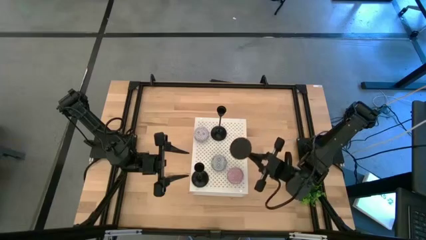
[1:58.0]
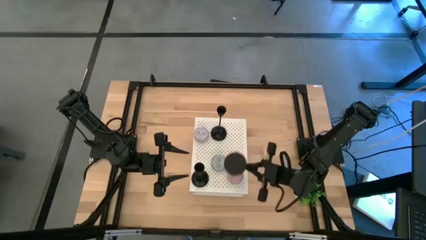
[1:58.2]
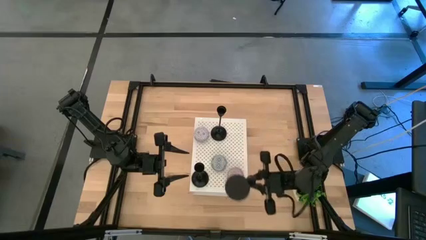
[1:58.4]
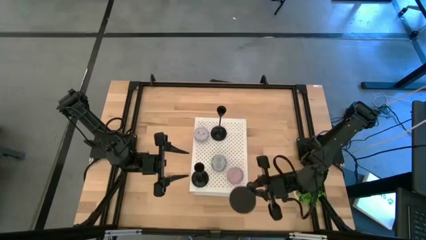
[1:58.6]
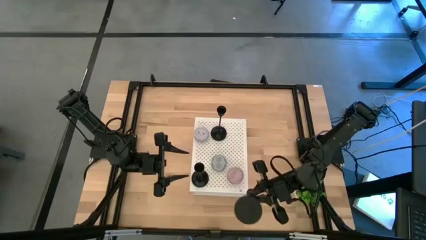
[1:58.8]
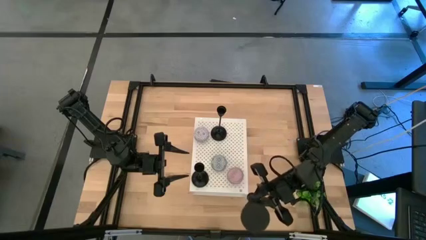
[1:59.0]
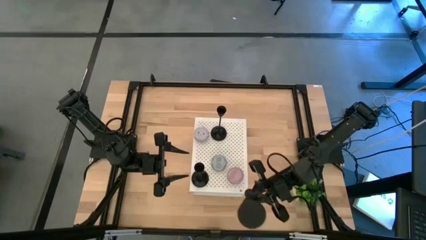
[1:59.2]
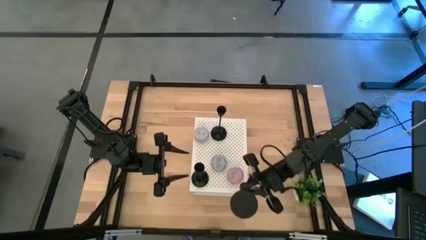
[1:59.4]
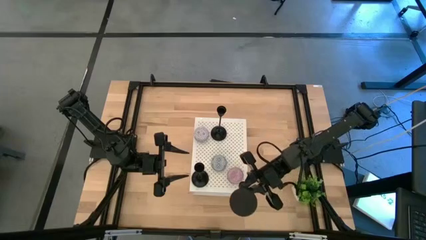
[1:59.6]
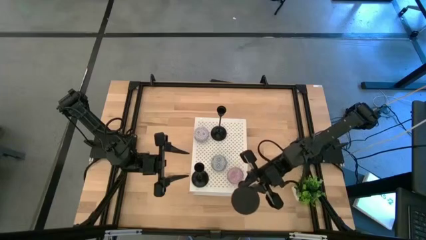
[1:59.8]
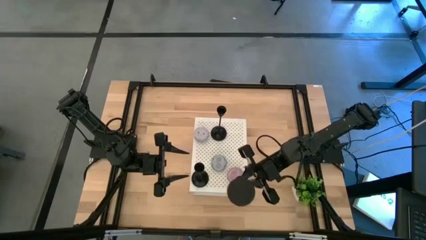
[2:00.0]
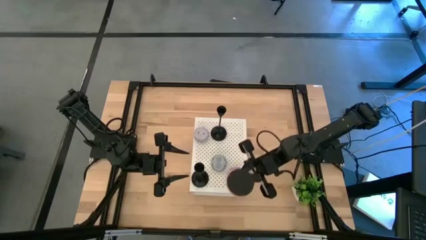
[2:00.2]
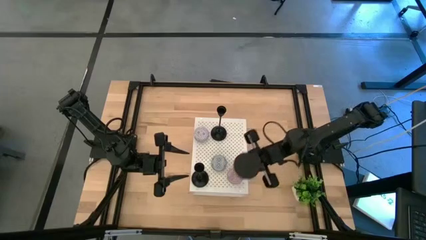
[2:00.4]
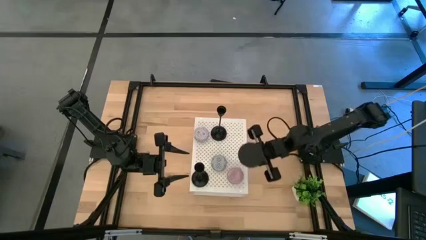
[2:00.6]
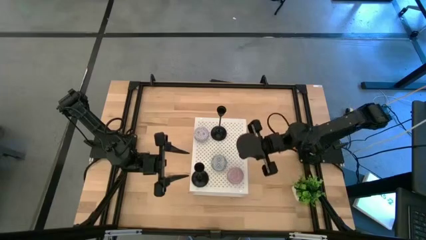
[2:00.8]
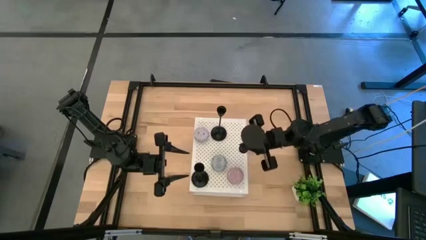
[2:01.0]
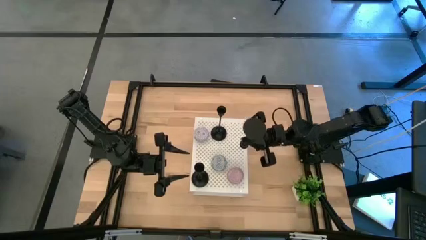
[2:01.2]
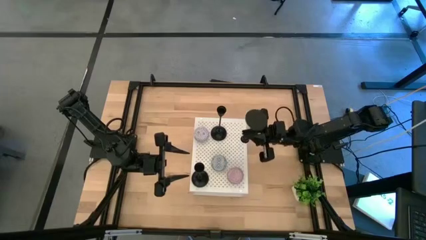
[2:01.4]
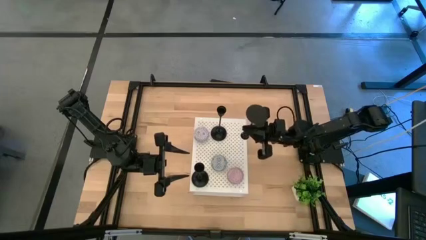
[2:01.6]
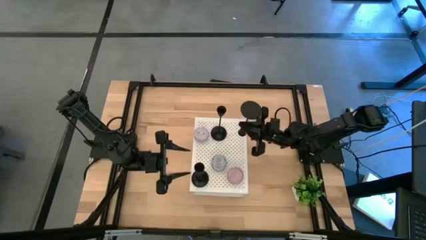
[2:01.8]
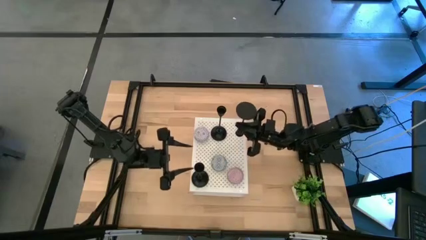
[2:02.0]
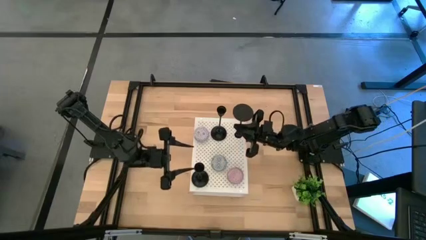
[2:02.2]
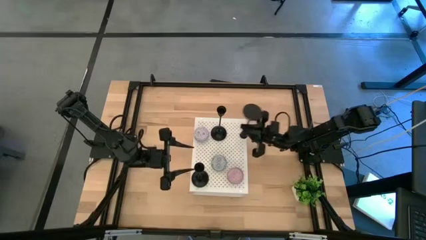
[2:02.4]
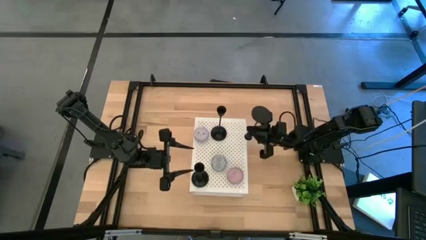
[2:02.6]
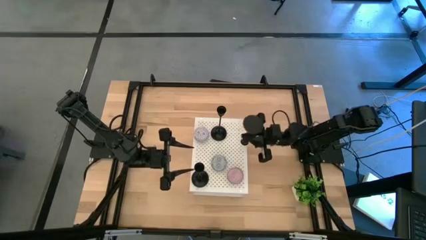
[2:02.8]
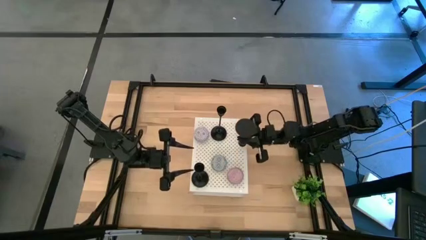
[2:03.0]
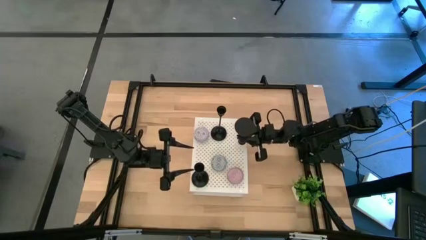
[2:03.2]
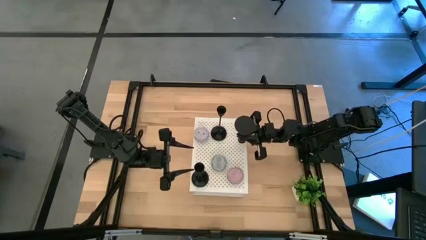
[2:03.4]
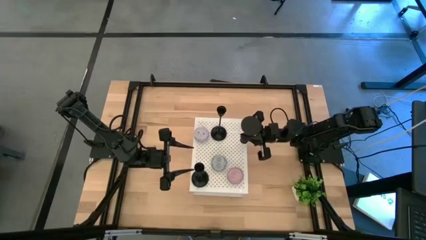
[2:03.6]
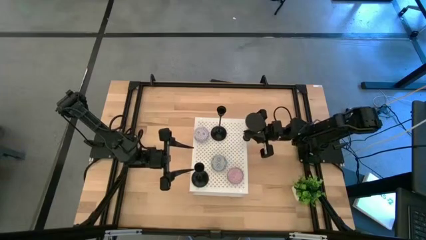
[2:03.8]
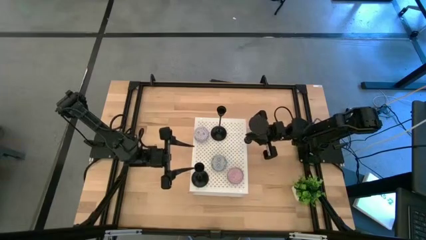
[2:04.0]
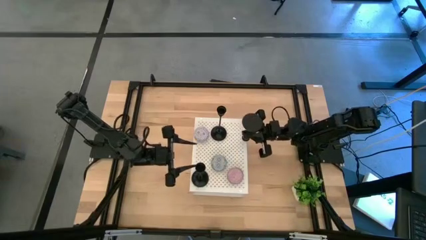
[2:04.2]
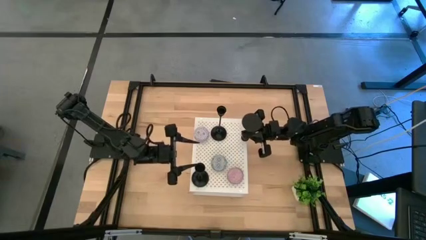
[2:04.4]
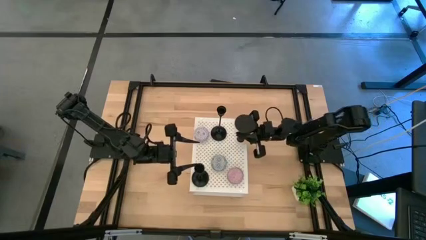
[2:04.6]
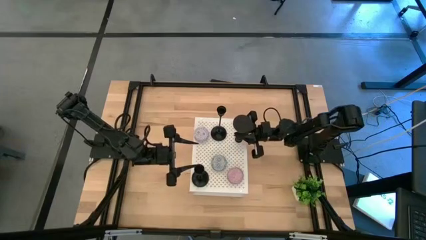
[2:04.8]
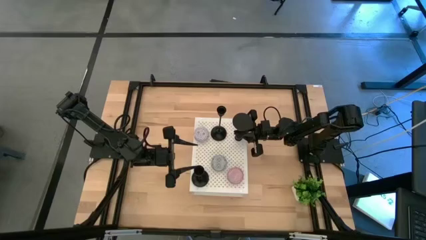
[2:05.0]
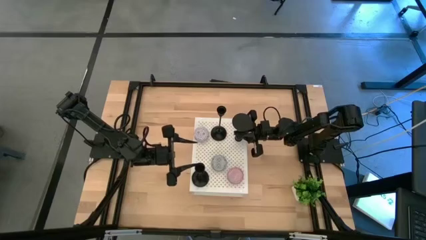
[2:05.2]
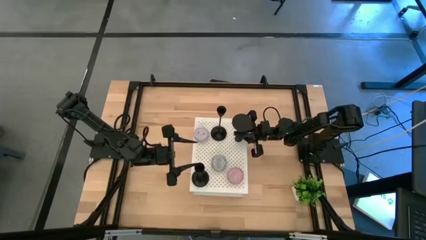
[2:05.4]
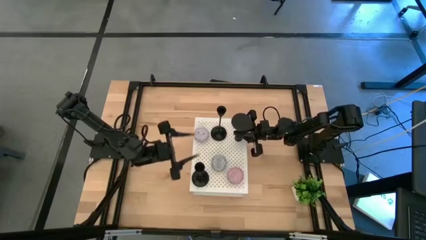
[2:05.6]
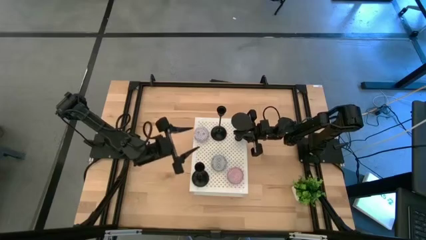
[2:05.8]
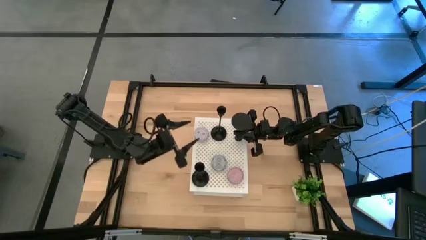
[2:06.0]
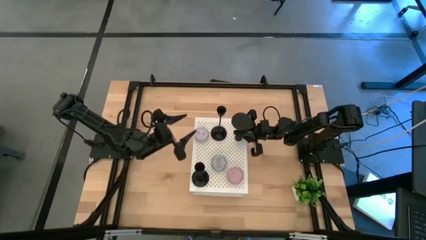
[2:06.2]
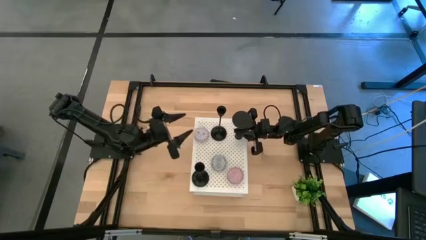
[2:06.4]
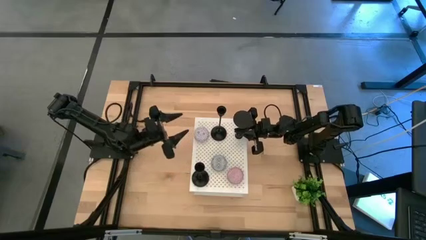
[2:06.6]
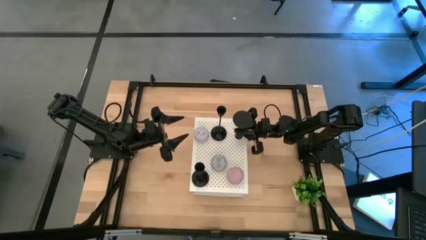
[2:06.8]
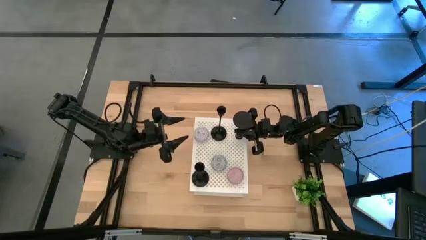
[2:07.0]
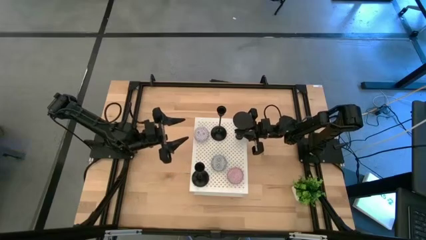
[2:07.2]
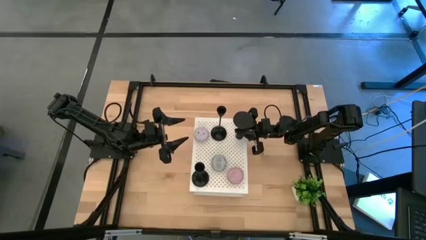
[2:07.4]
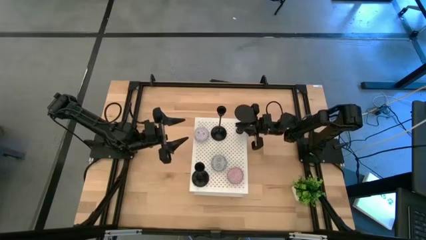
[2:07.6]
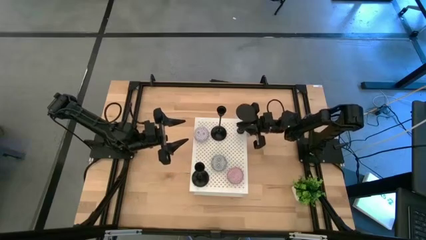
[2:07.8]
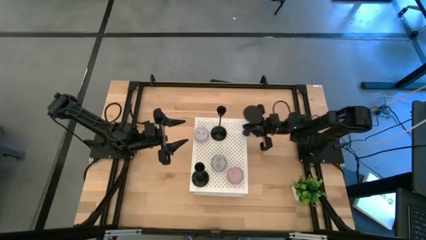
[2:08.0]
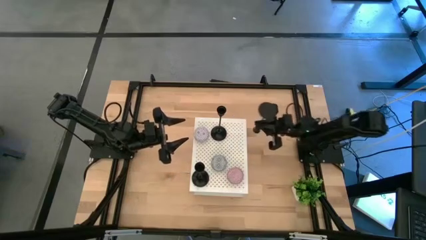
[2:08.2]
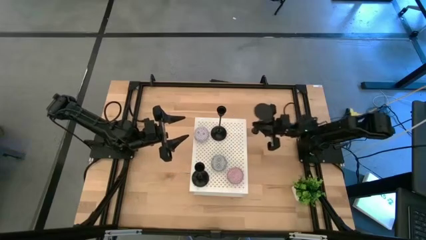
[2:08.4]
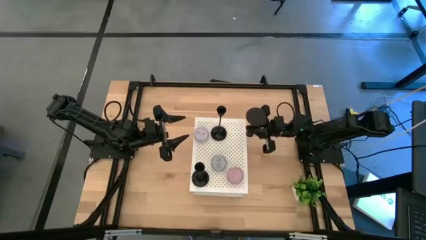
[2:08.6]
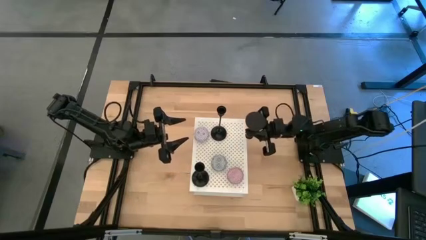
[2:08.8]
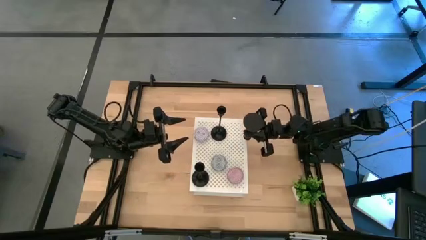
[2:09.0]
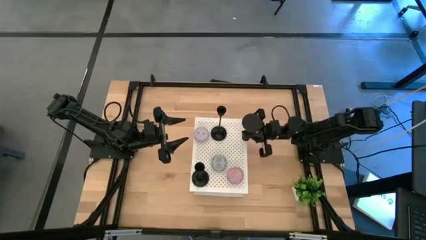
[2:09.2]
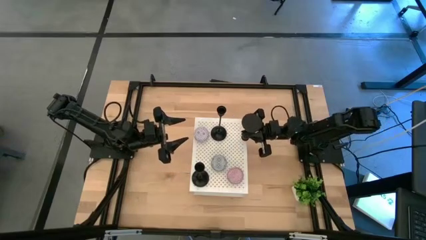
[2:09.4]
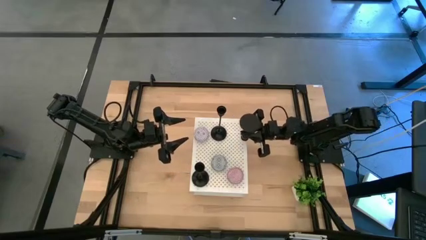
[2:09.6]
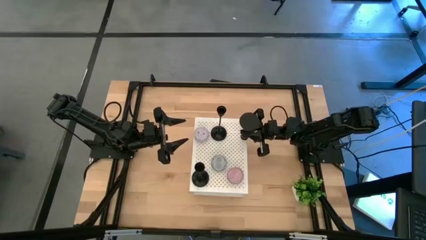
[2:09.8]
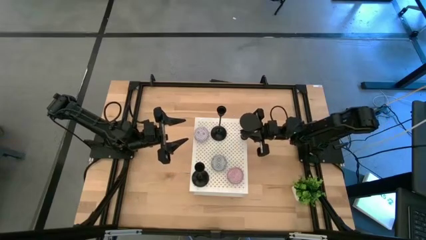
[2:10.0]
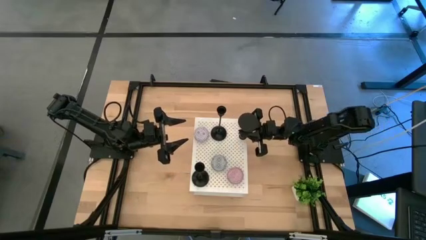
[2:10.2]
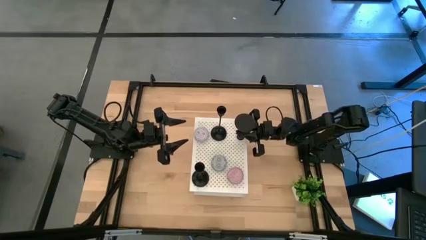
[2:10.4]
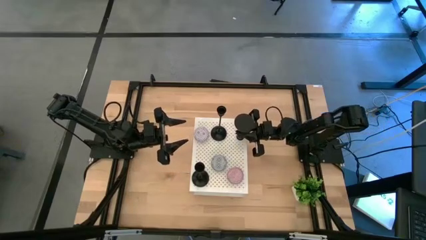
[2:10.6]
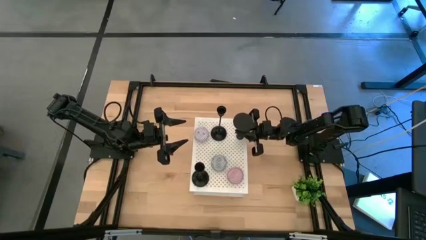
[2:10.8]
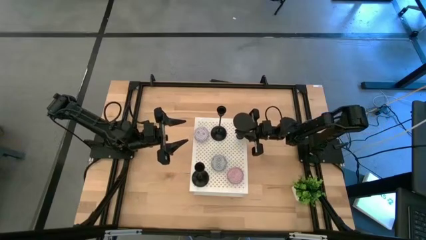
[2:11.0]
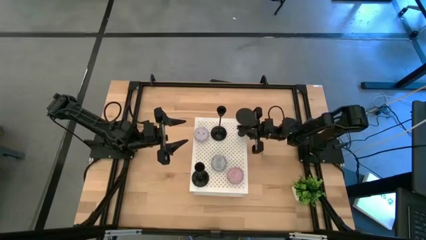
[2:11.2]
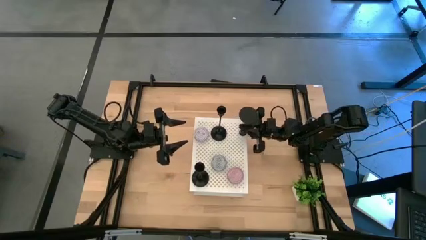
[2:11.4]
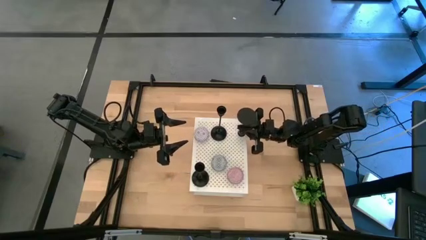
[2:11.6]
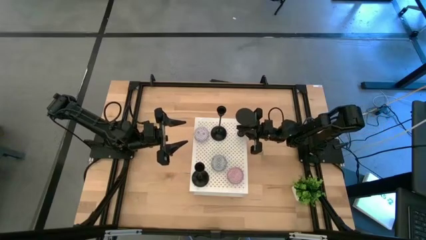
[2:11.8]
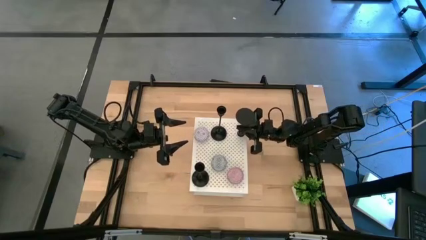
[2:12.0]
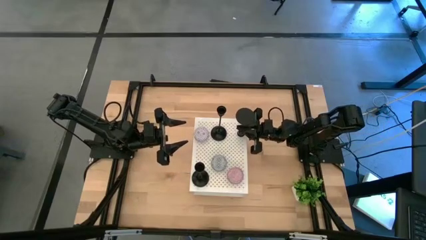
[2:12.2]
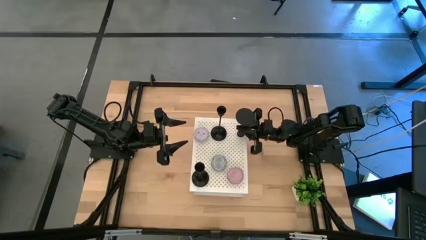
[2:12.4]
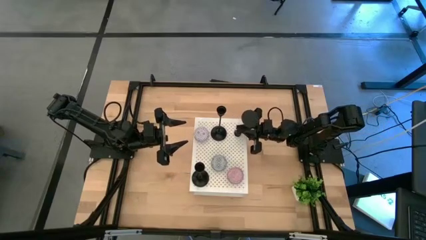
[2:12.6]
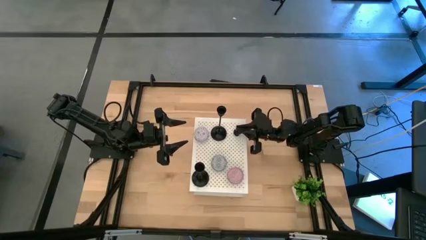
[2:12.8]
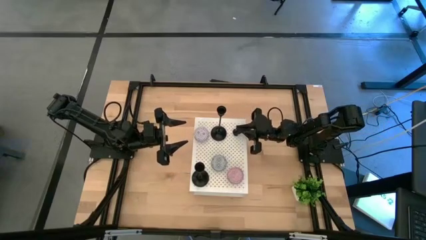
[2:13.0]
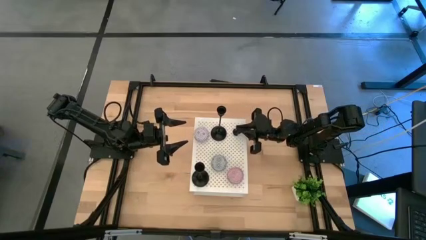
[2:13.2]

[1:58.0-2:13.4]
Task: Pick & Place candle stick holders
Put the candle holder on the shelf
